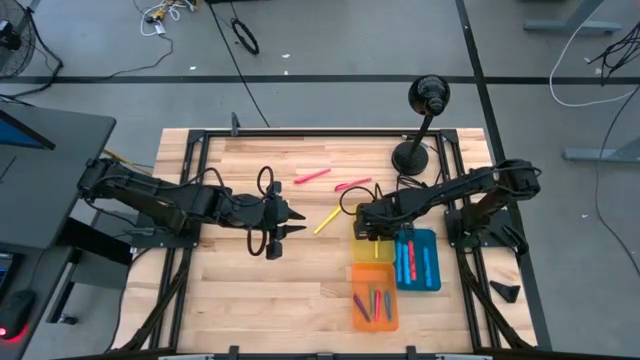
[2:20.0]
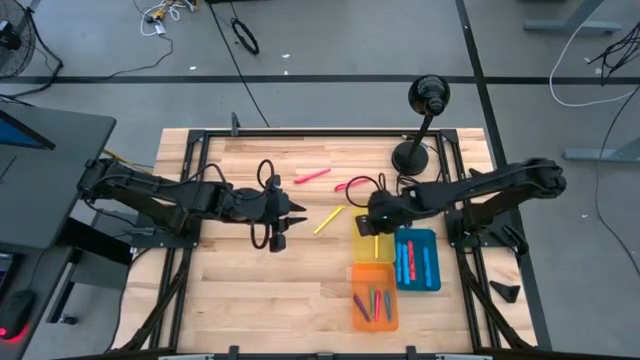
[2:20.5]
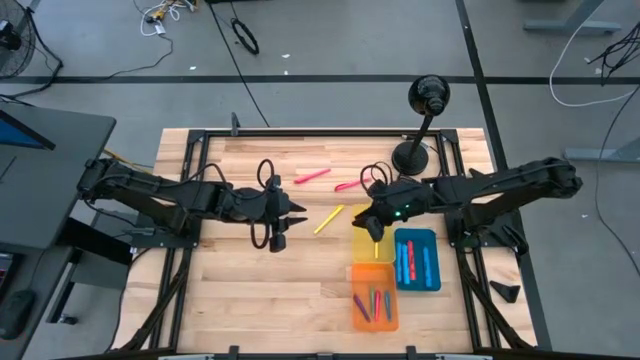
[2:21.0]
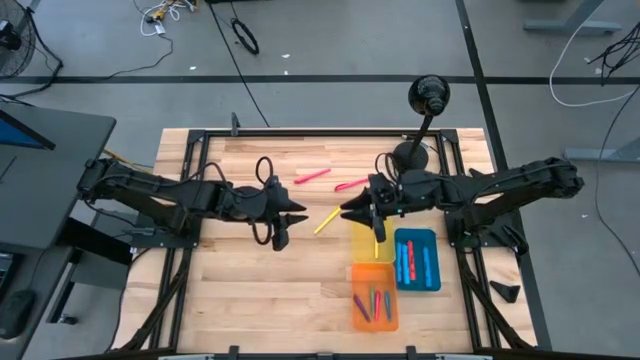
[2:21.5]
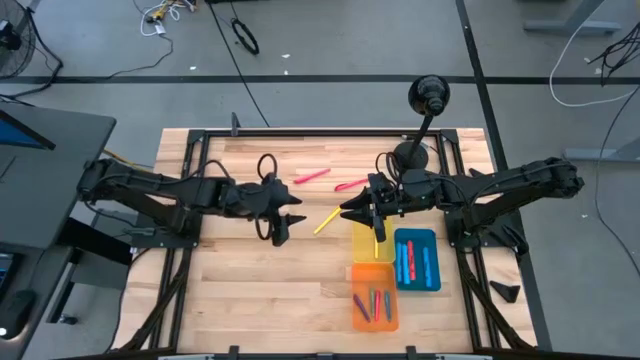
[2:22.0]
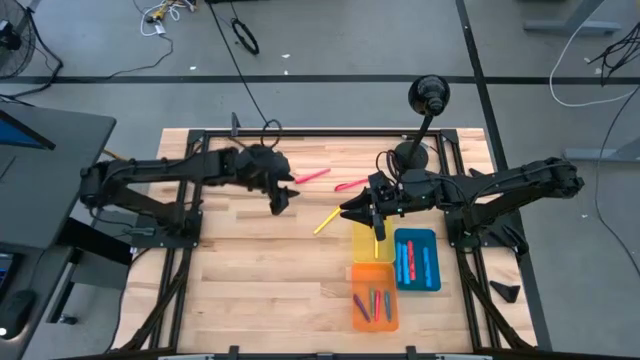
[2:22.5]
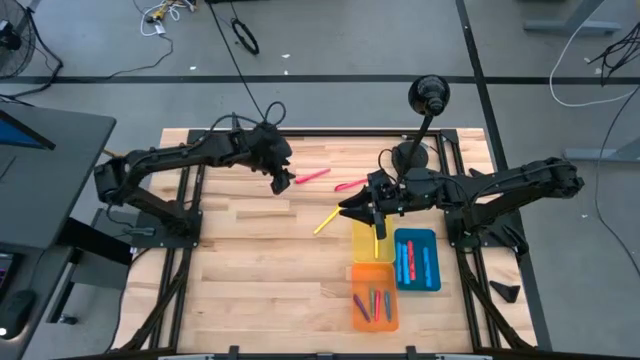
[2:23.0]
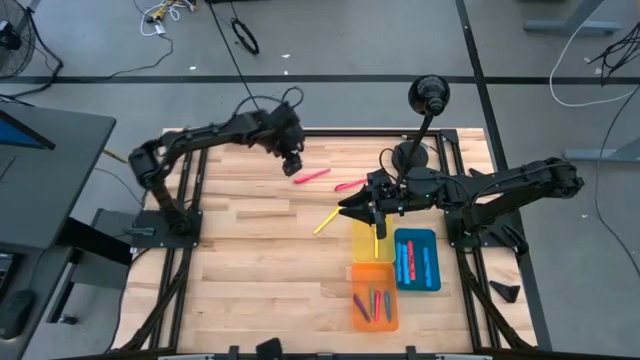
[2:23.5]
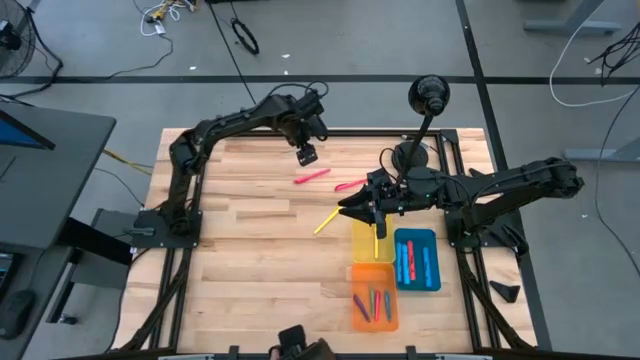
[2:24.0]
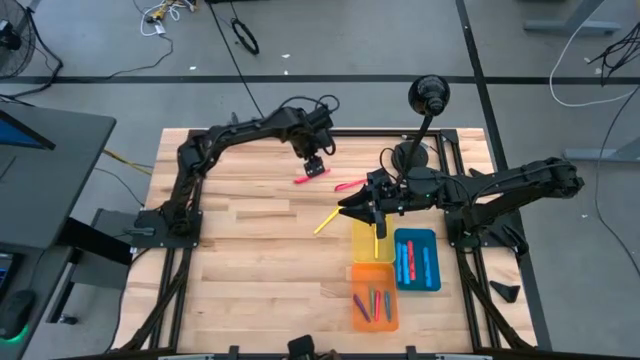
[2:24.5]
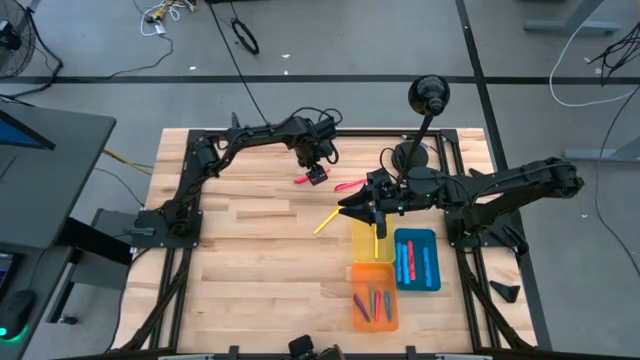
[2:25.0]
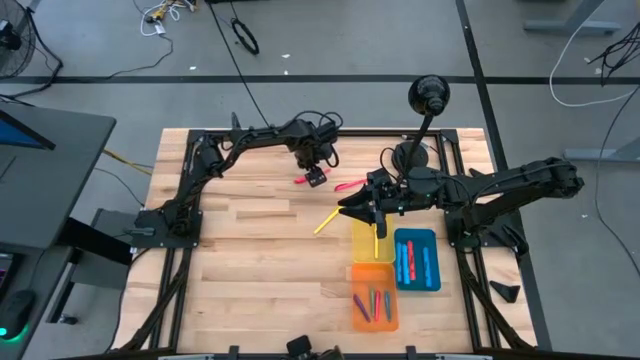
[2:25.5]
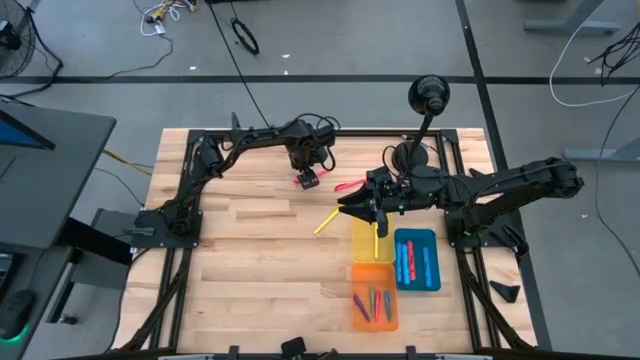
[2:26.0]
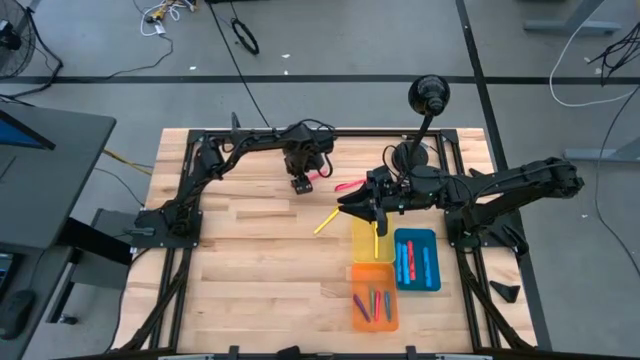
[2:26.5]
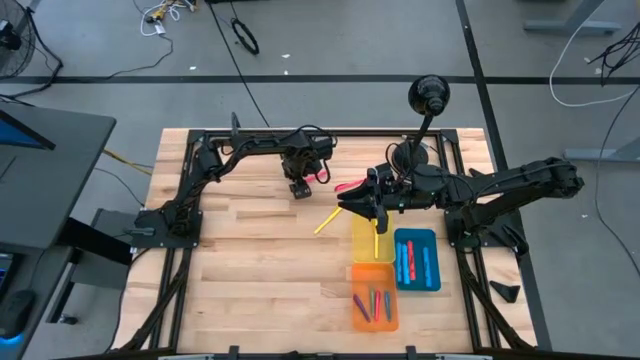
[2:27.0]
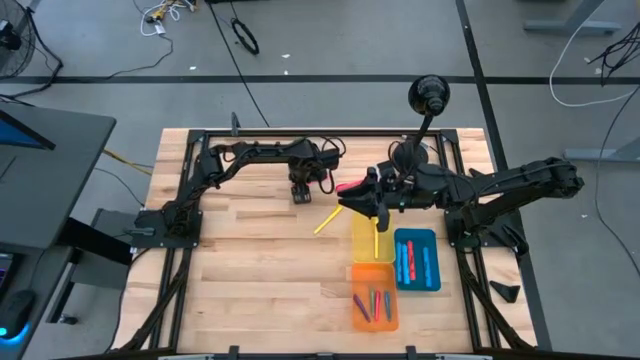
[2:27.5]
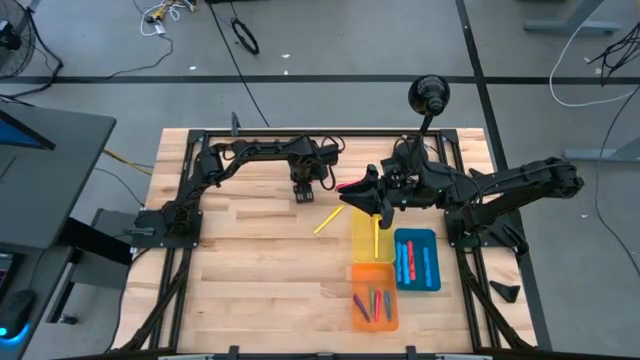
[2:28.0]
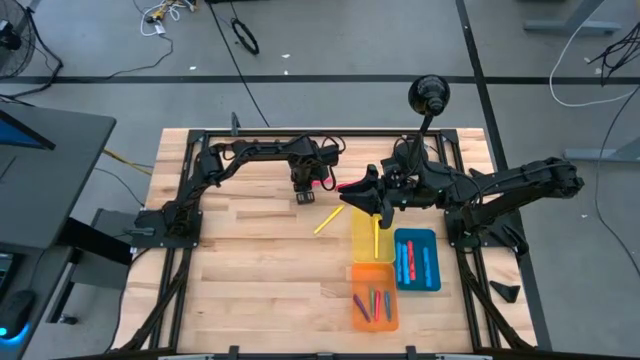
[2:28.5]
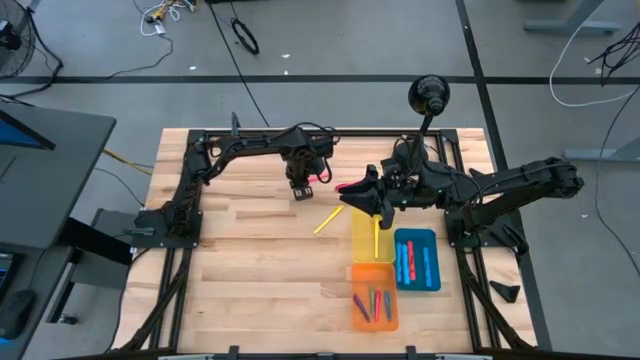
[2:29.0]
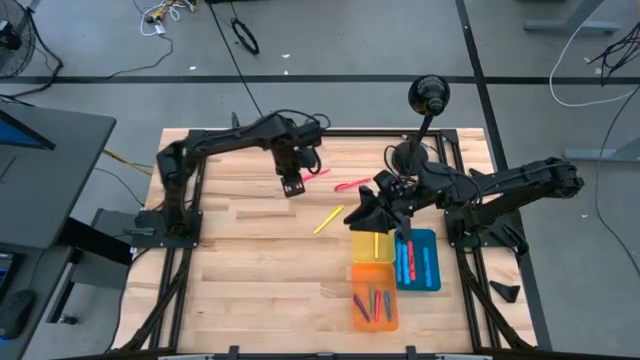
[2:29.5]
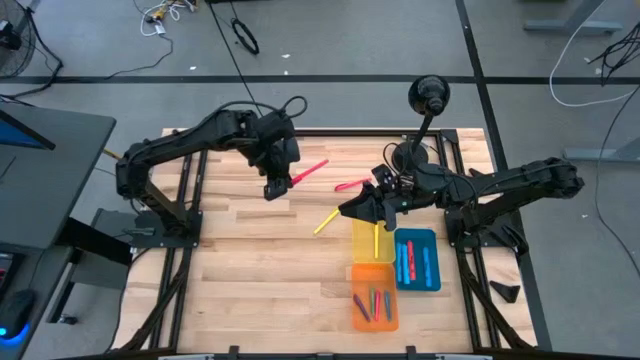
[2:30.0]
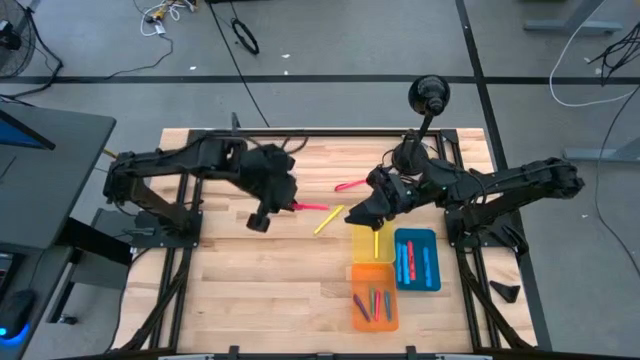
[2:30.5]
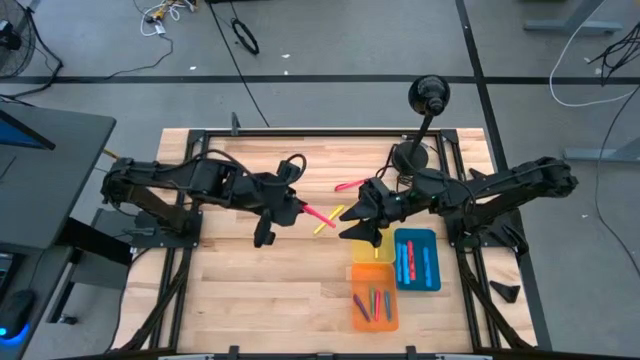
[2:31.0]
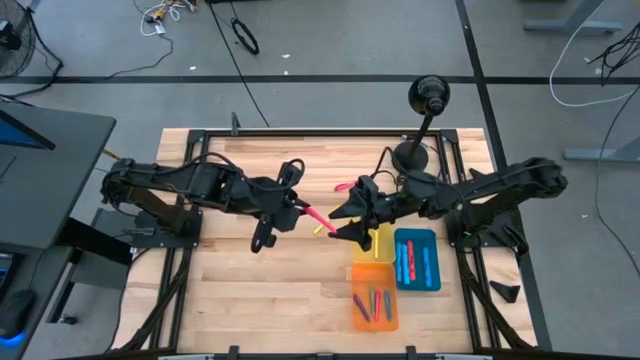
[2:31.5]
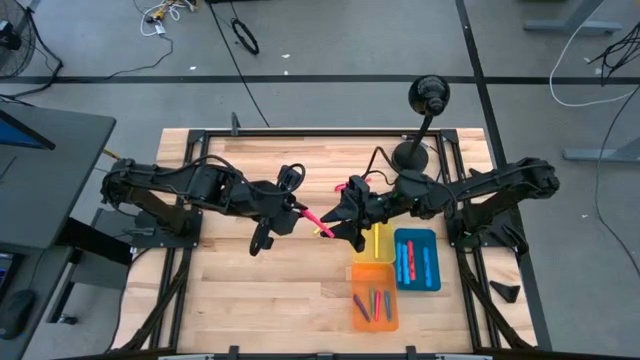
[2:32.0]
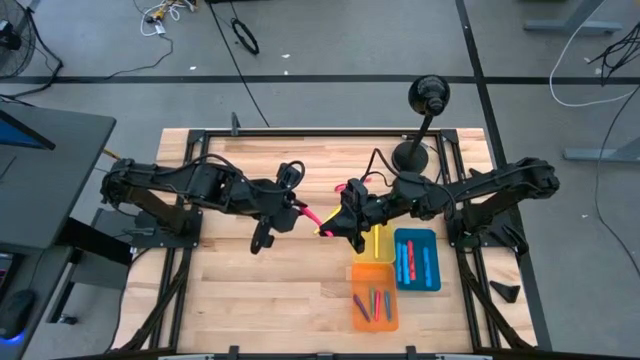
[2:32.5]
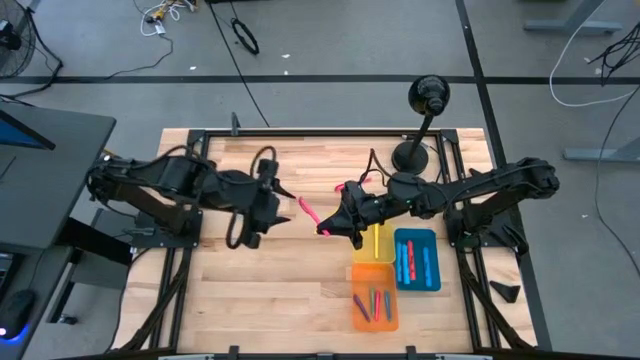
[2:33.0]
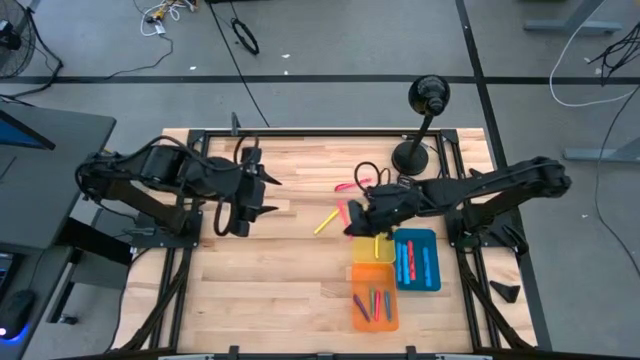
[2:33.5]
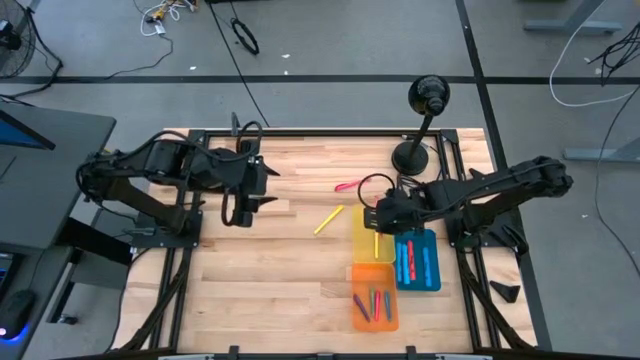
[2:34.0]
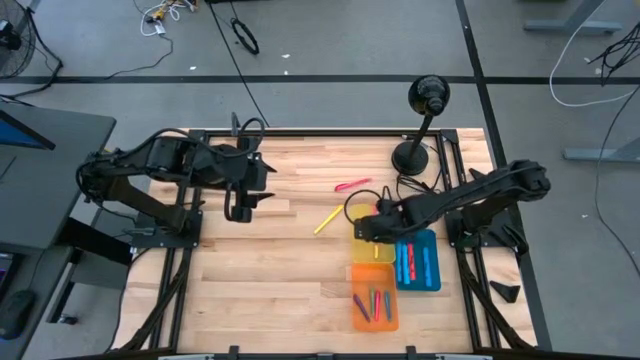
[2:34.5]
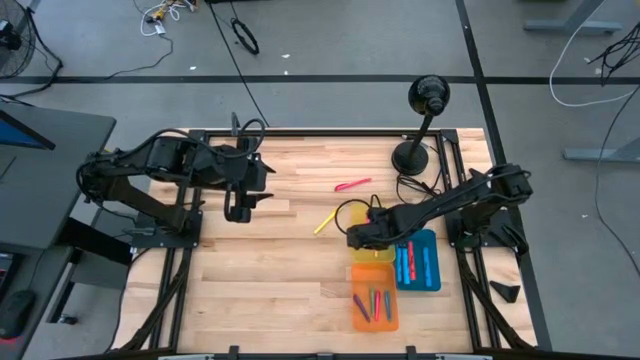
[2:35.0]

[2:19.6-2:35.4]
Task: Pick & Place Markers
Put the left pink pen into the yellow bin

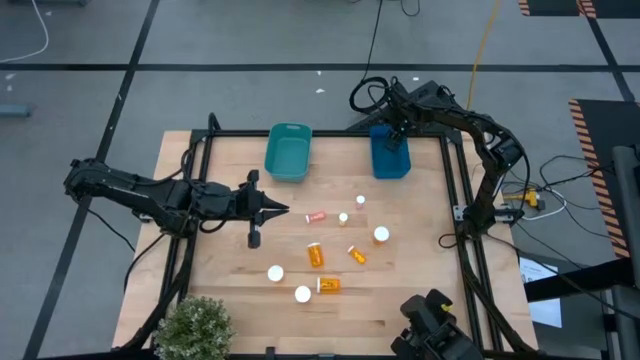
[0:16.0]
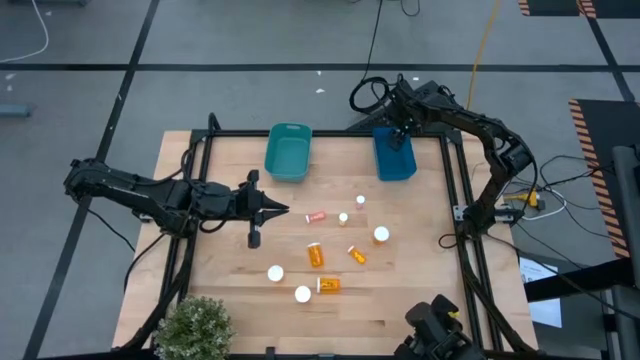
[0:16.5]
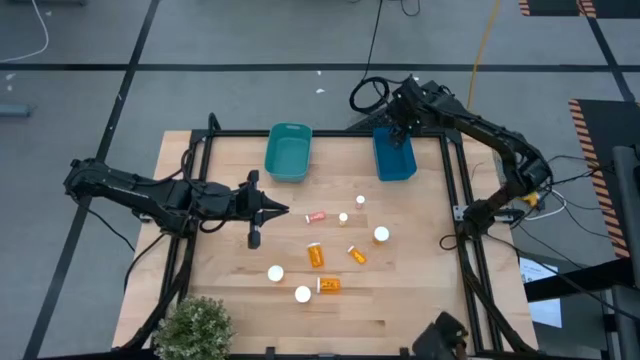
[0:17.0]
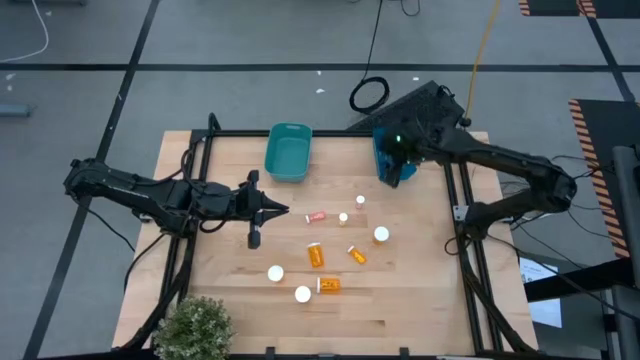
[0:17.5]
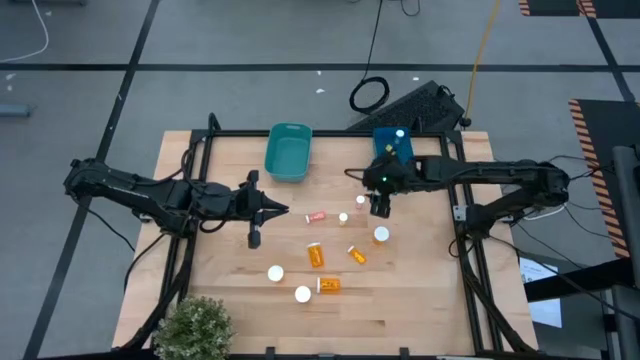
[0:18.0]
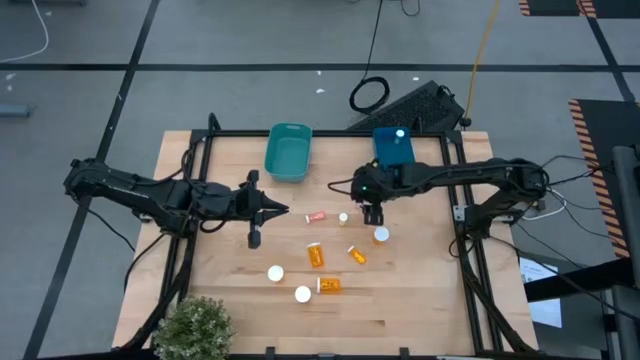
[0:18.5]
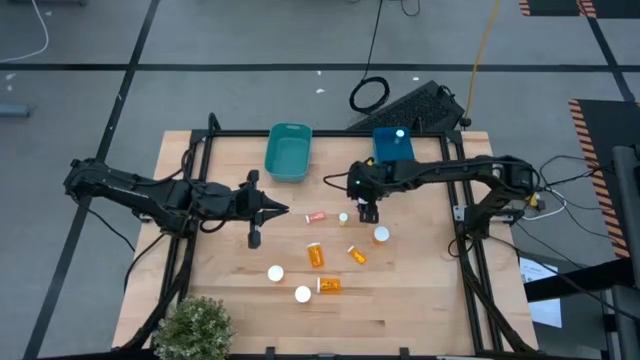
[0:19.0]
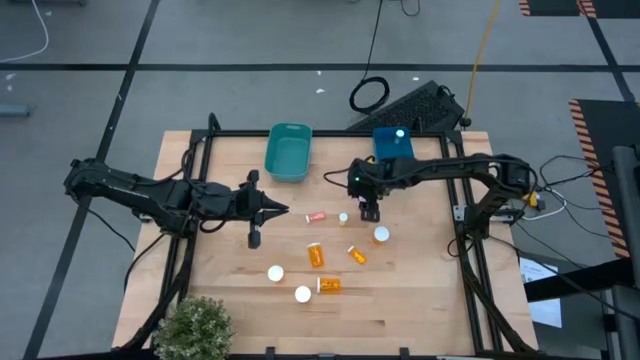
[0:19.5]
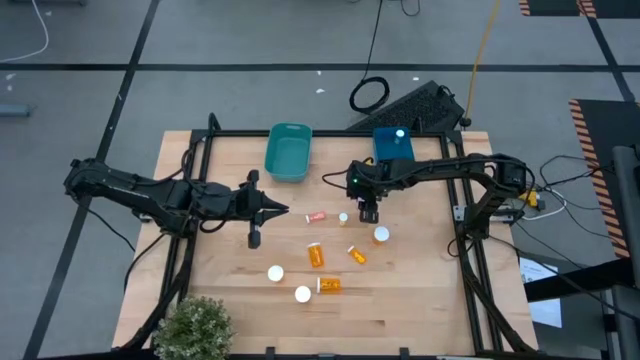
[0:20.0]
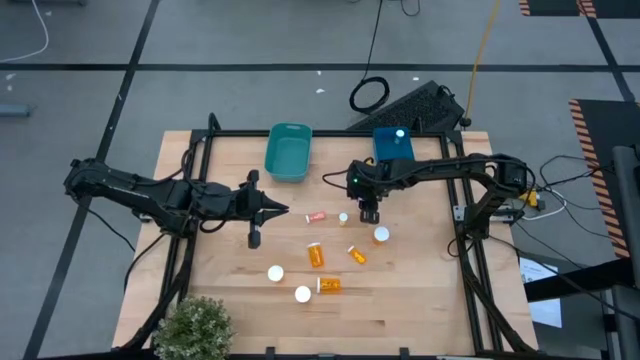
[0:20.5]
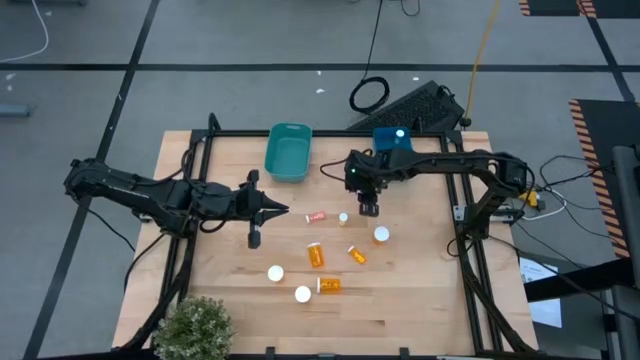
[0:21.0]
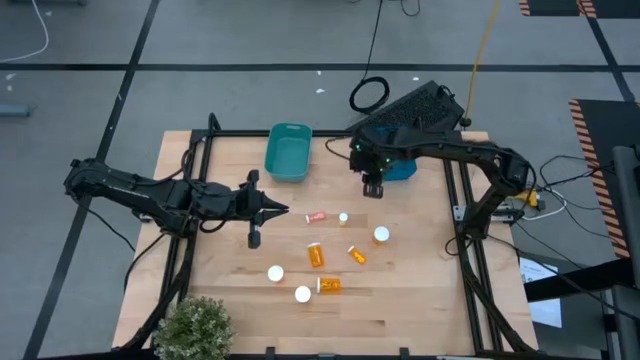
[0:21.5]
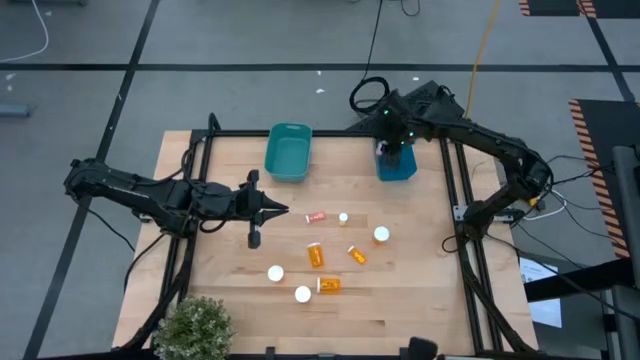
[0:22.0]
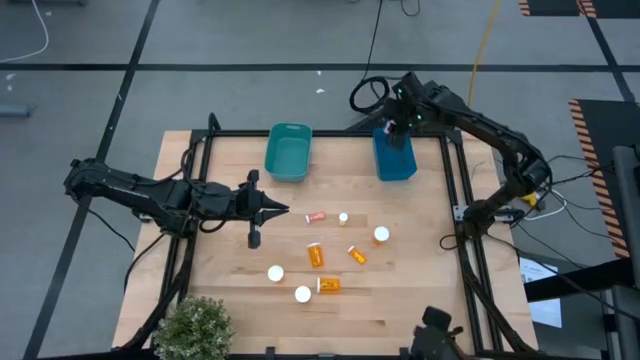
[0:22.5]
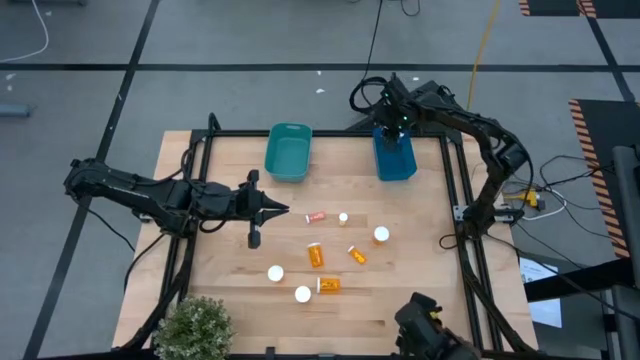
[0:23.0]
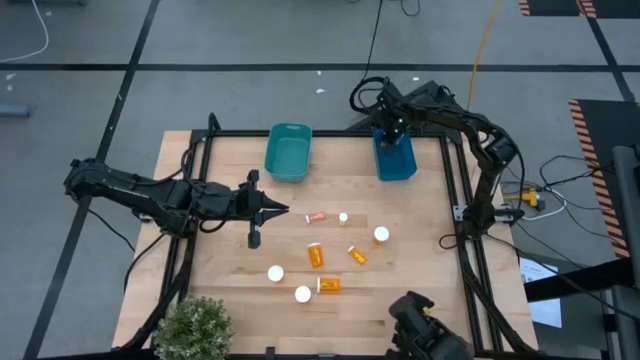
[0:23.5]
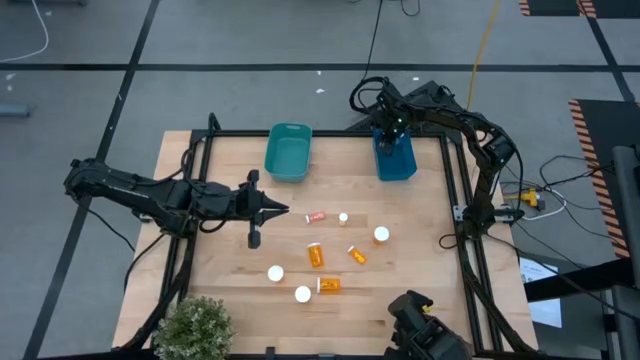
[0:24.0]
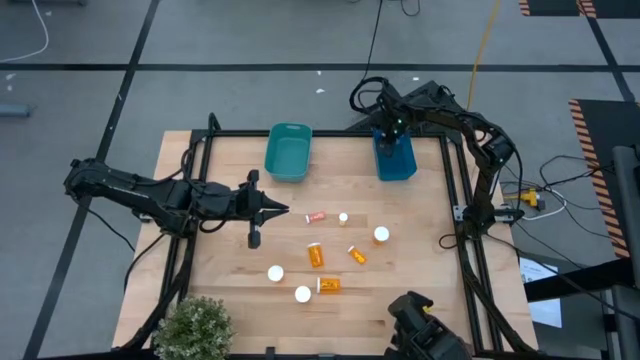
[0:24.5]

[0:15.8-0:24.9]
Task: Pick and place medicine bottles into bin by pill shape (circle, oval)
Put the left small pink pill bottle into the blue bin
